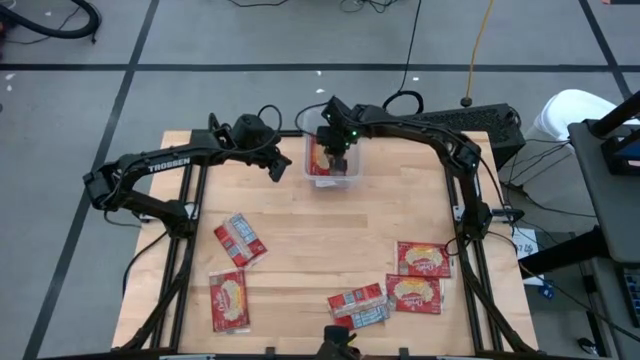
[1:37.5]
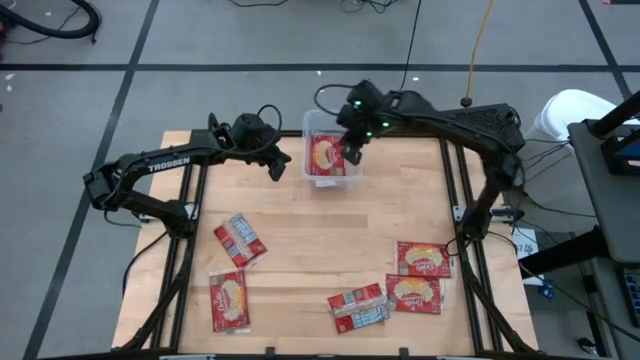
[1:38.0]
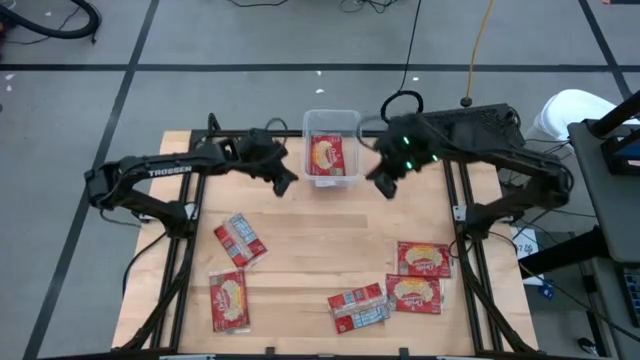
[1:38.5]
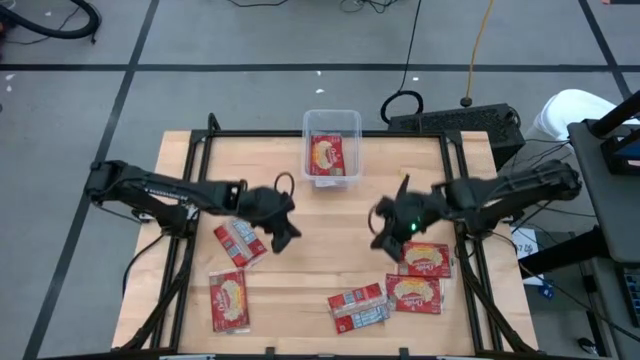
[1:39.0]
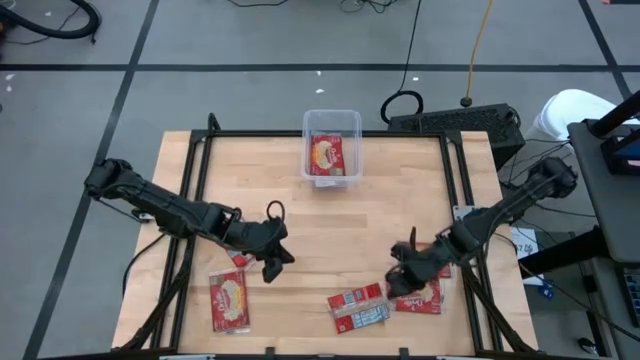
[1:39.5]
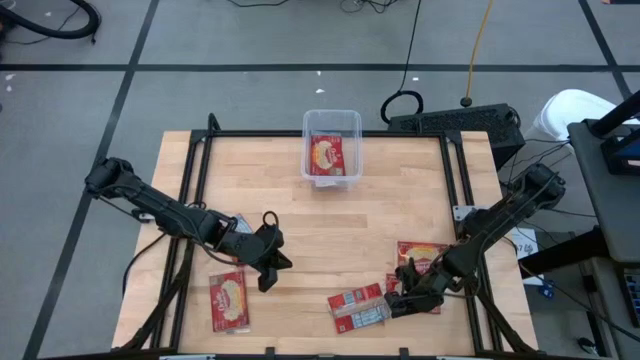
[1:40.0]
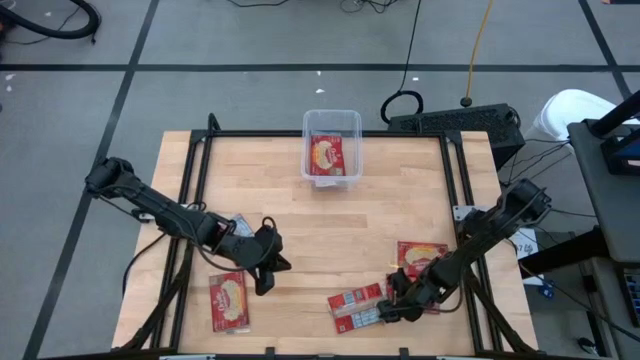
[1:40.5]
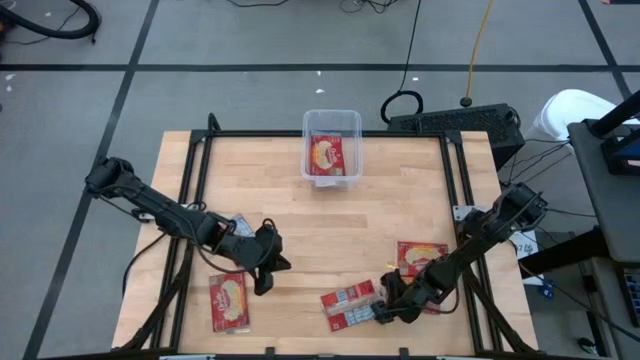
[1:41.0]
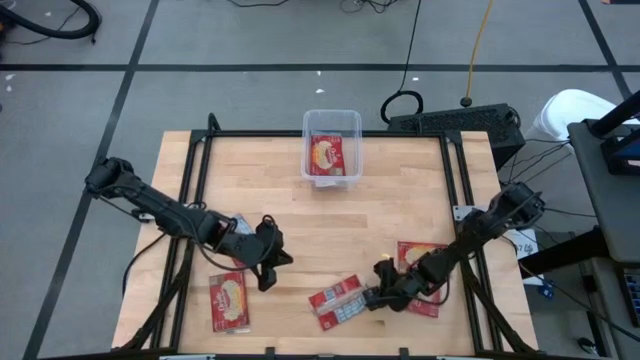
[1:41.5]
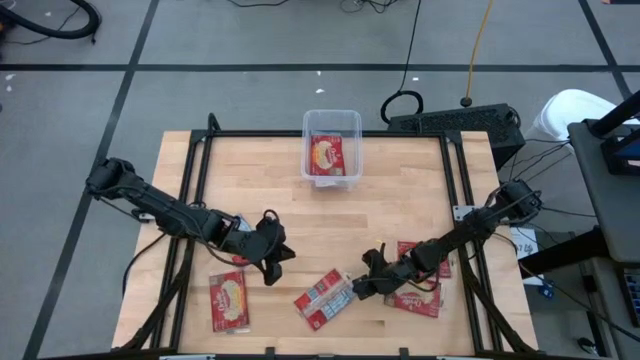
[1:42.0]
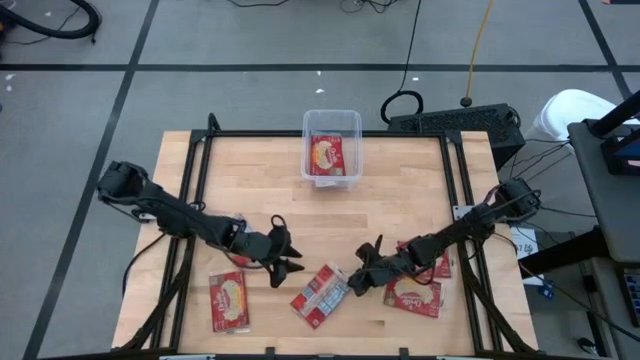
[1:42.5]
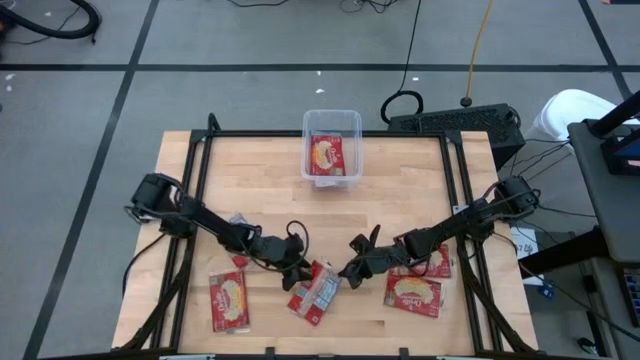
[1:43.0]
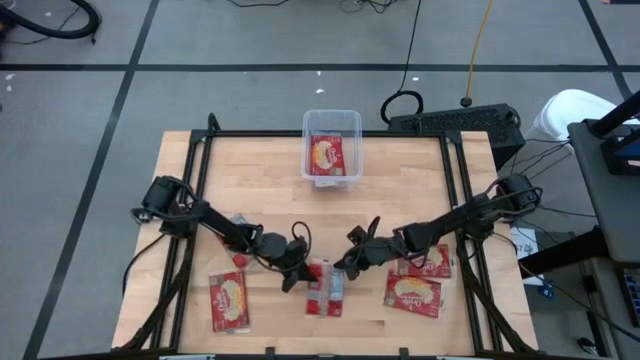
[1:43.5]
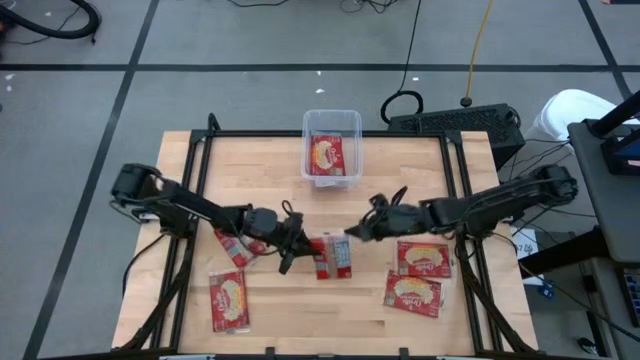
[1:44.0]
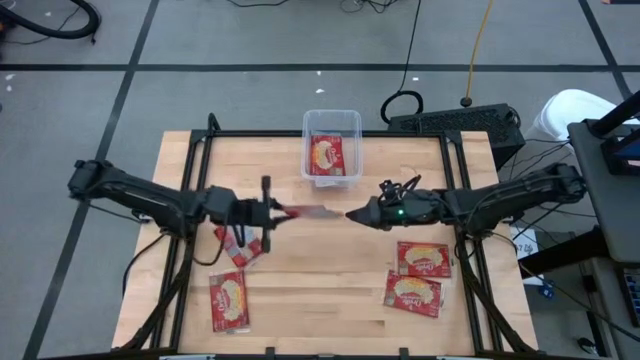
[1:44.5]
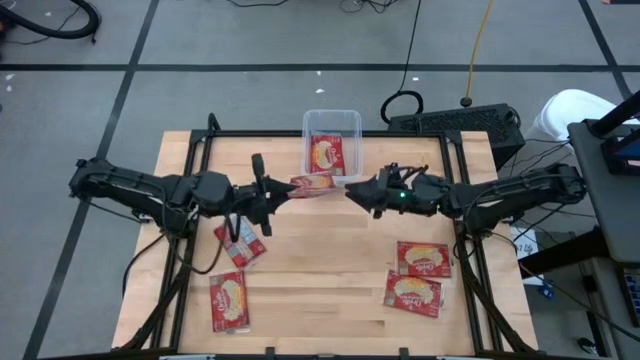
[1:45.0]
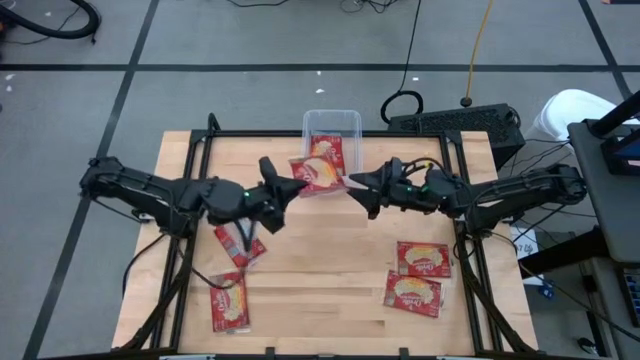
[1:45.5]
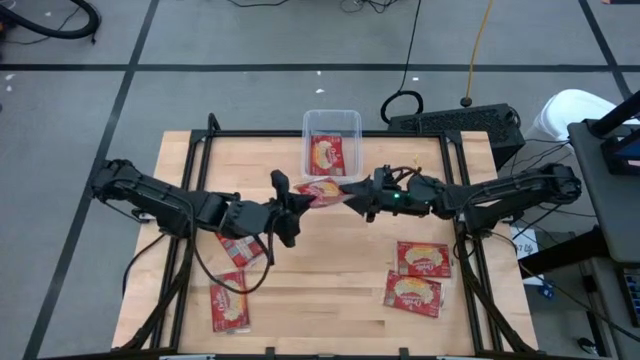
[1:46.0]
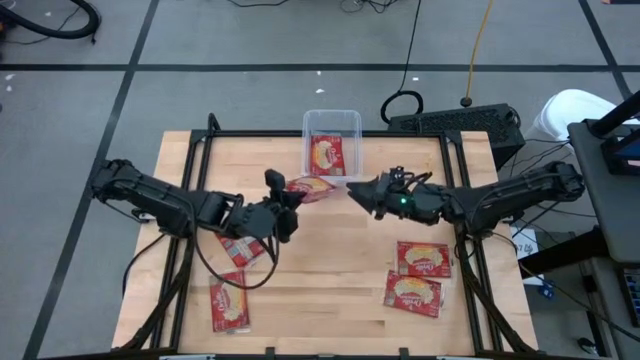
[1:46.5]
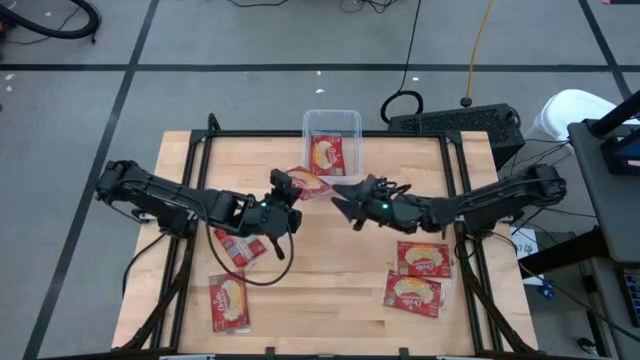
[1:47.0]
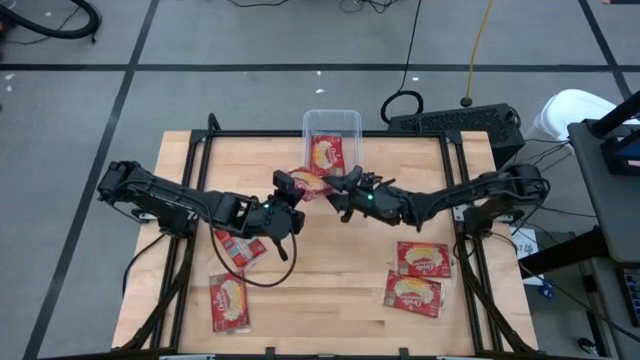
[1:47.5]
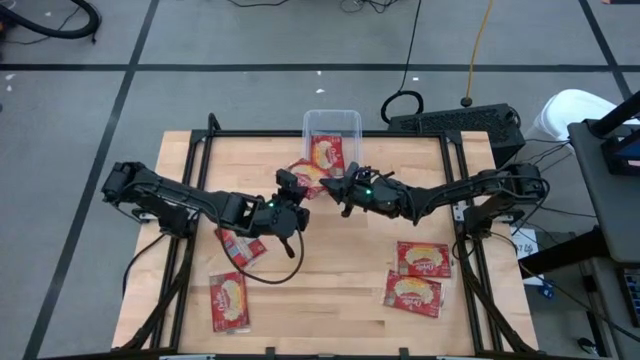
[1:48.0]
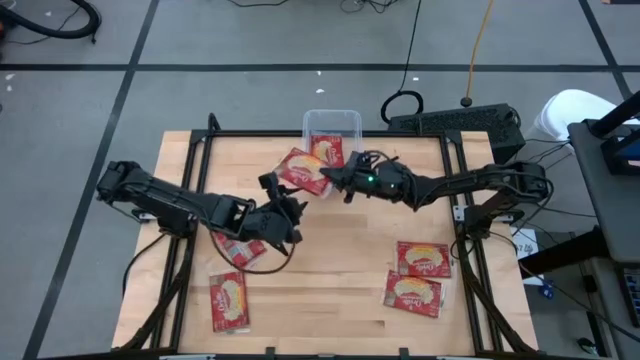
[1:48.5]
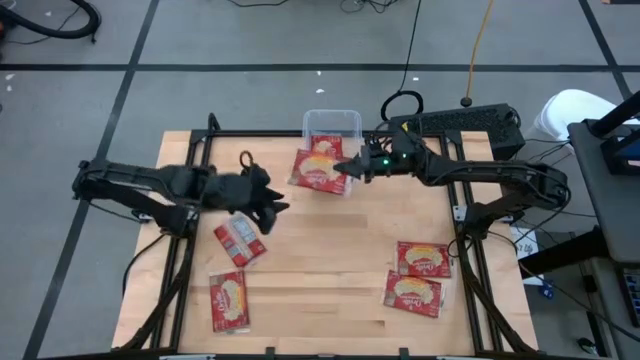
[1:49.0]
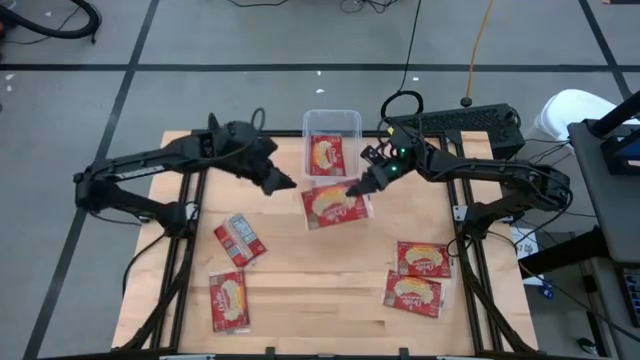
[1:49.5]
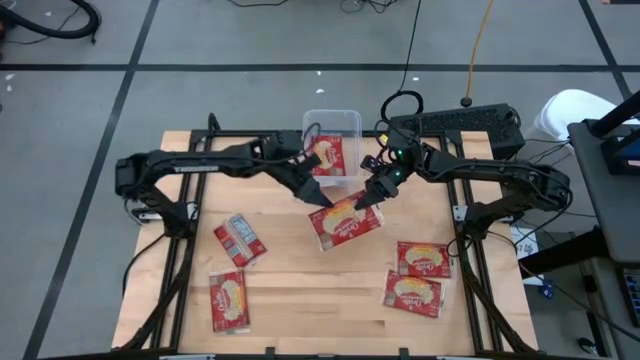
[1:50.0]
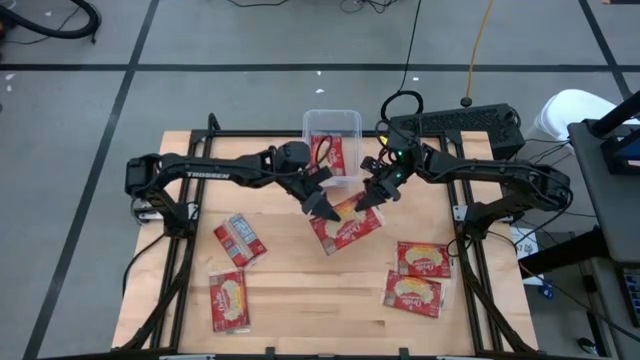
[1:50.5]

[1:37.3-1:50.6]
Task: Sort popcorn bags into baskets
Put the red popcorn bag into the transparent container

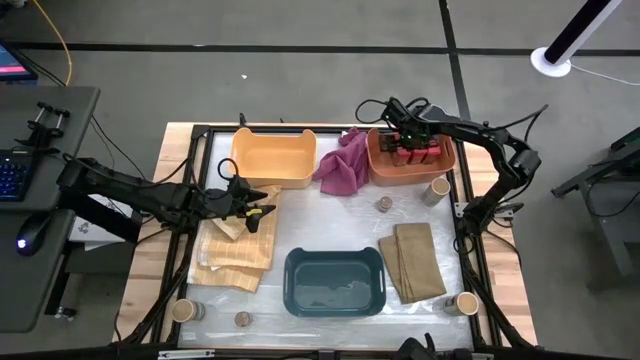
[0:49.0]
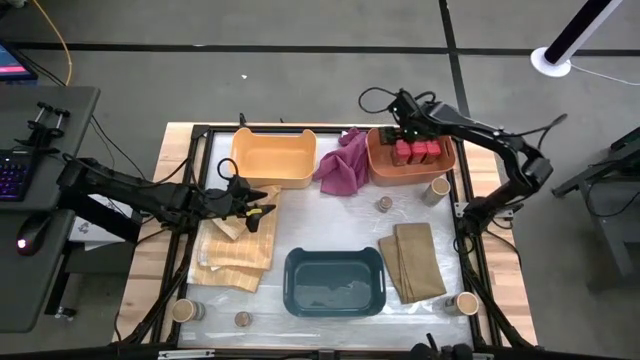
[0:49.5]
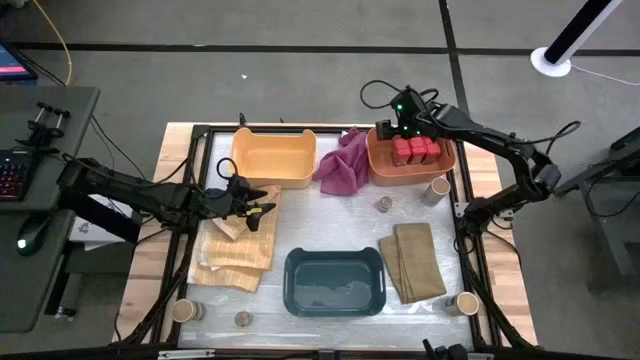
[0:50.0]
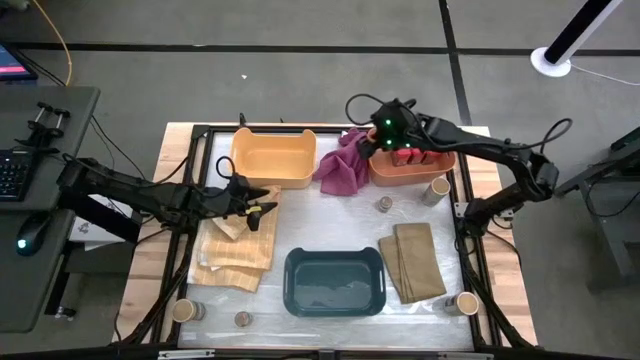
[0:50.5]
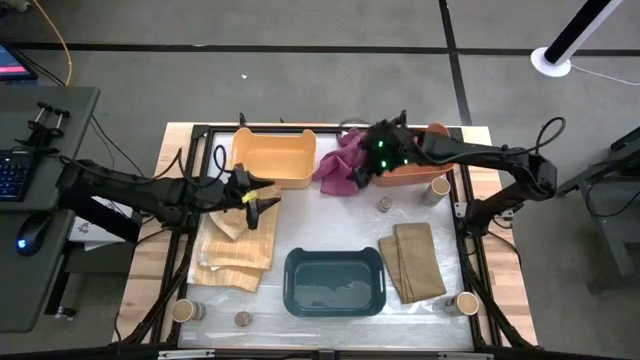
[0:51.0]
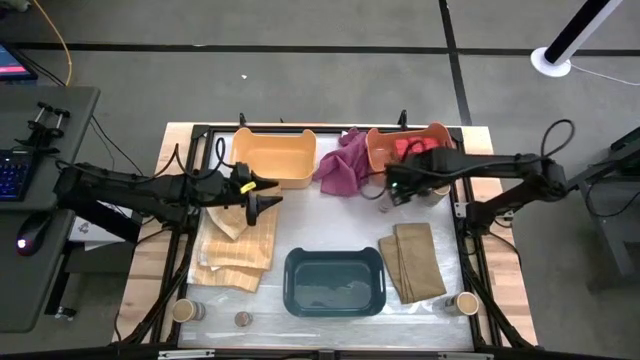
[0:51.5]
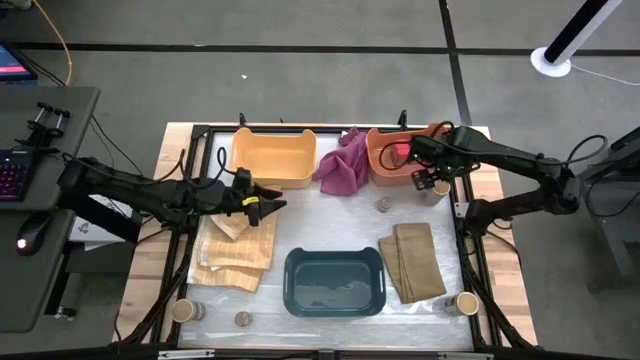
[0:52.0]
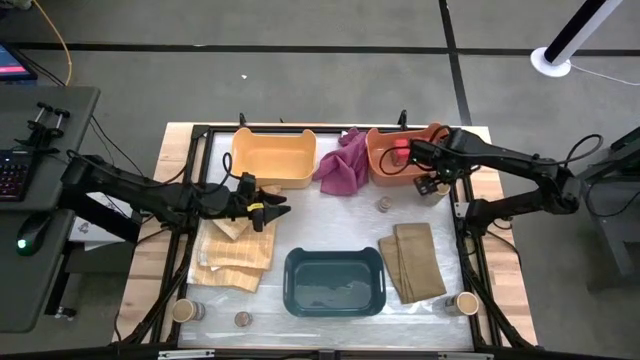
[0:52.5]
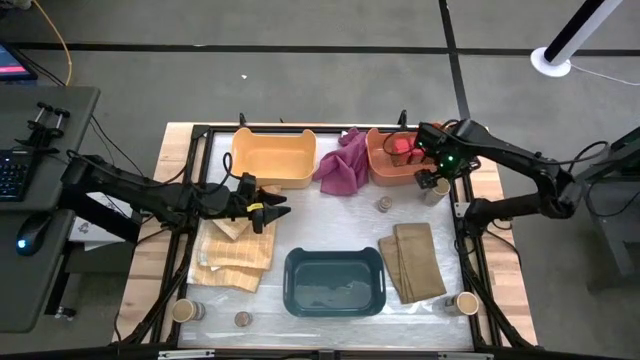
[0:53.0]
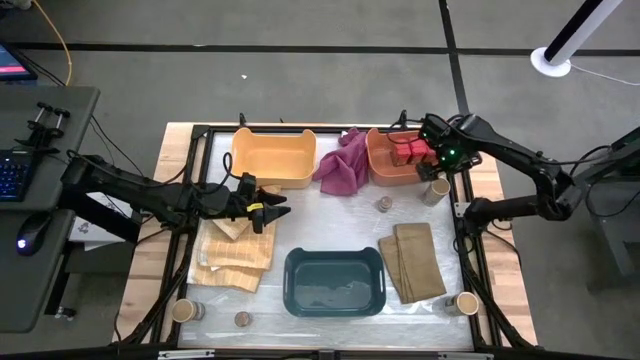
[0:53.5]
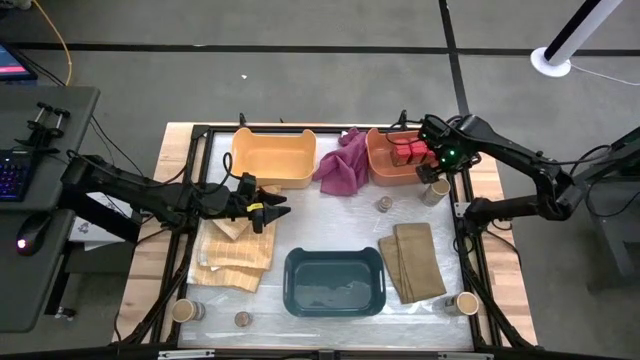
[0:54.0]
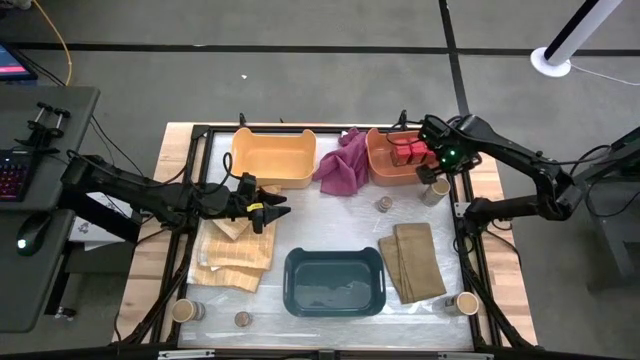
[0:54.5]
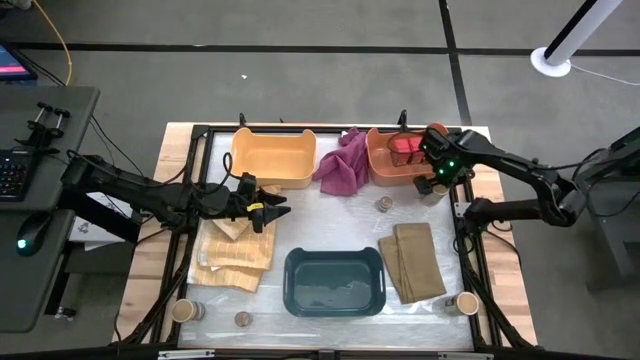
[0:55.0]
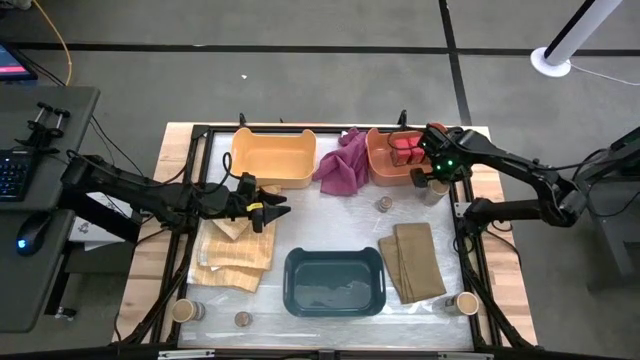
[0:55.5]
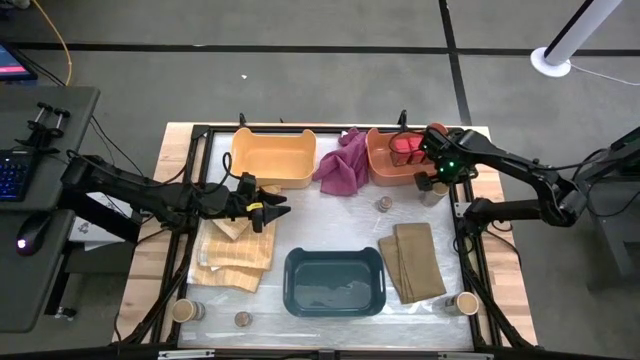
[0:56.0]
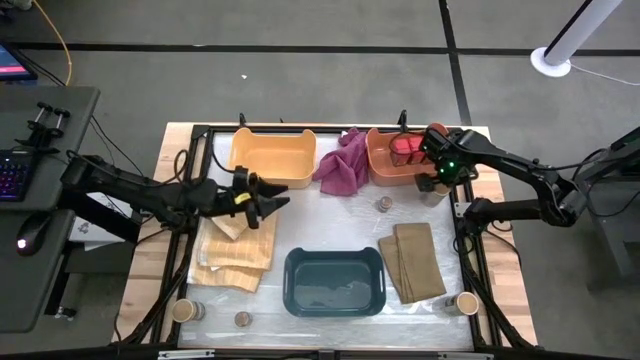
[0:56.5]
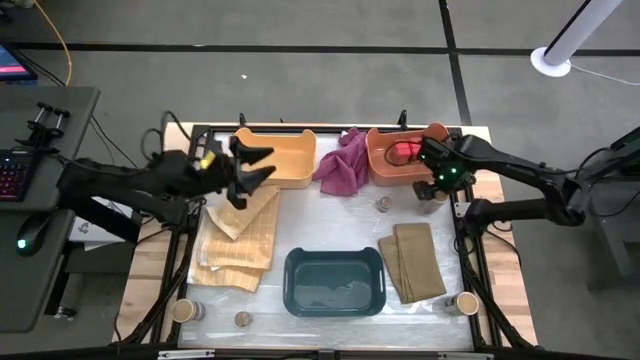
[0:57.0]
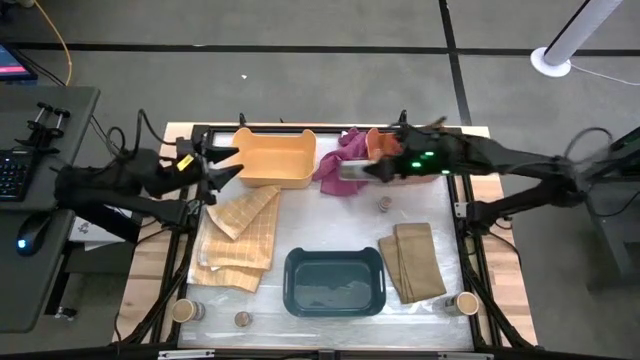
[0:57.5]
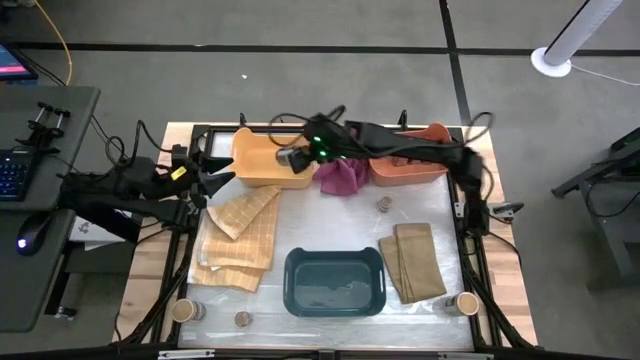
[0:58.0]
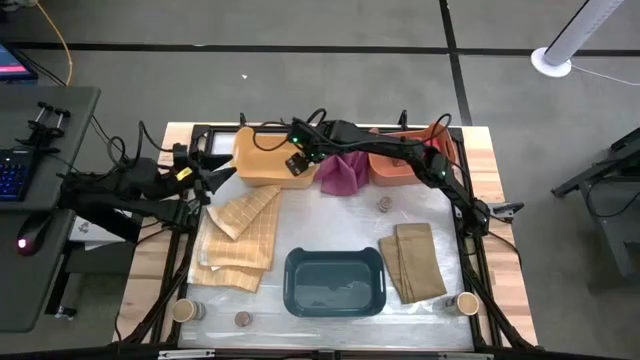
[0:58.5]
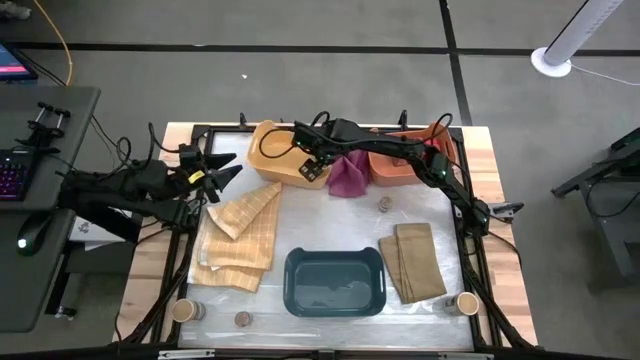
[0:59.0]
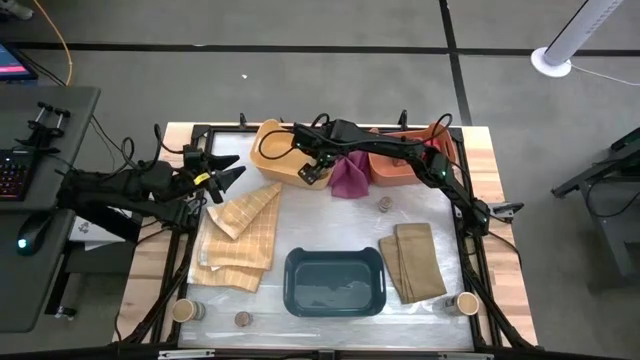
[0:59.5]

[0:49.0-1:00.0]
Task: Sort spices by type
Put the top right brown seasoning bottle into the yellow bin
